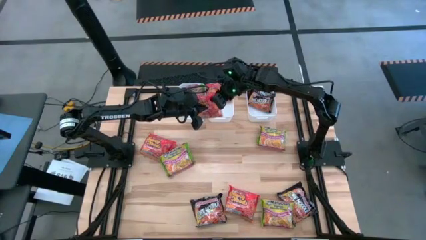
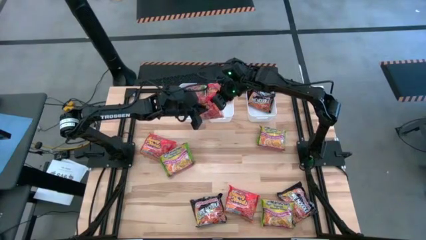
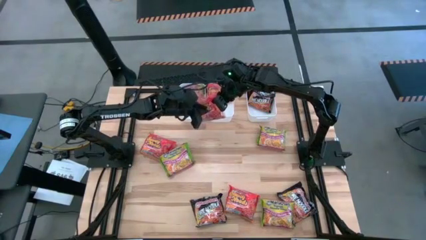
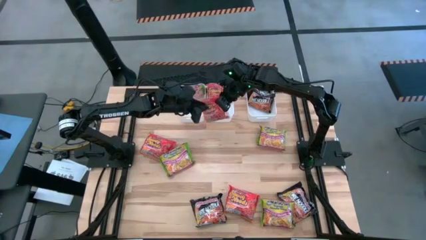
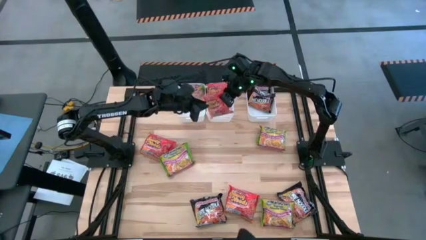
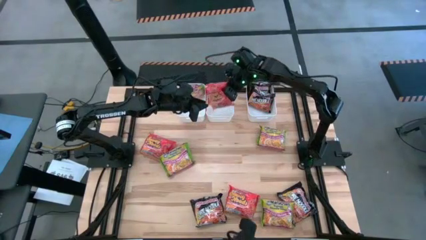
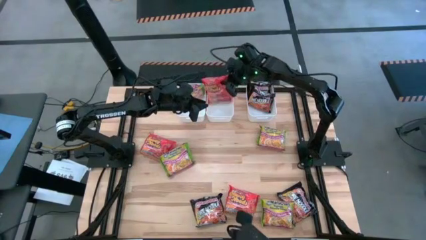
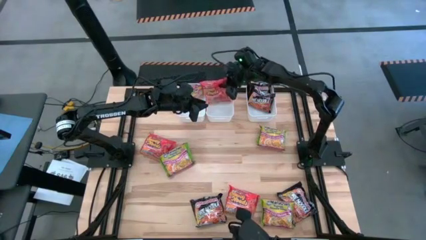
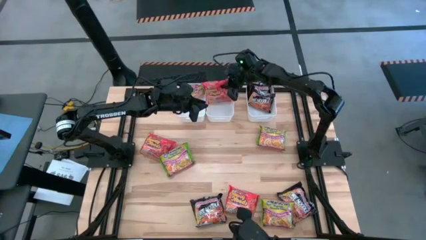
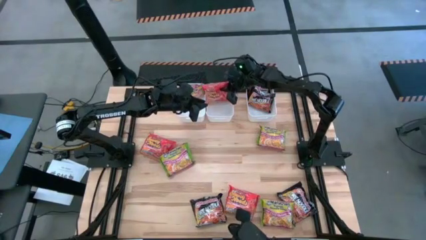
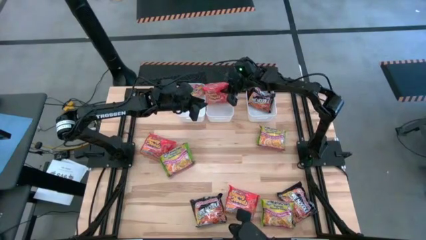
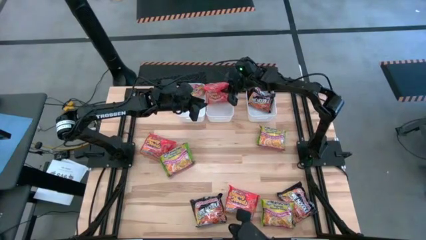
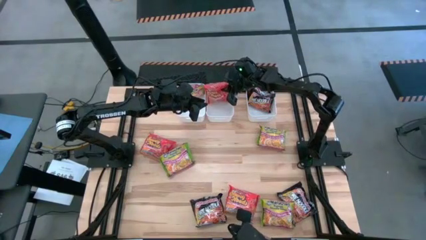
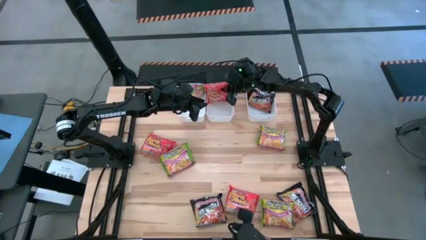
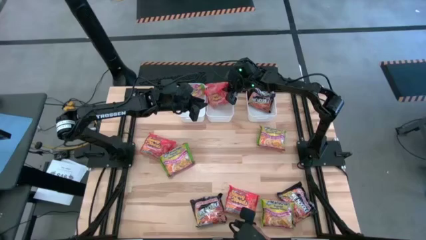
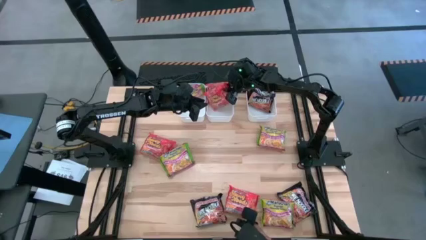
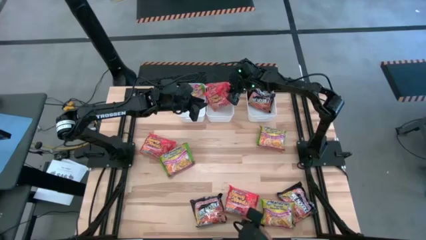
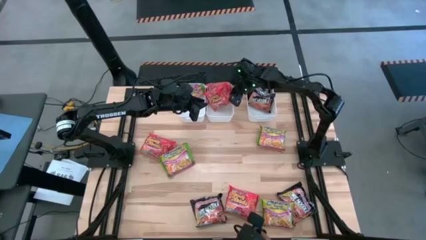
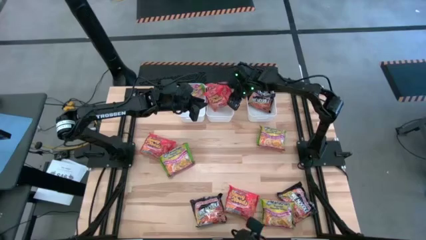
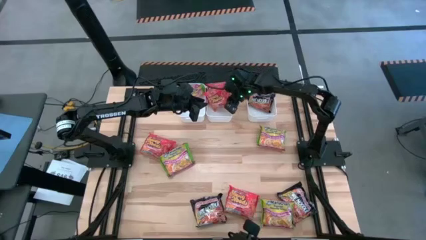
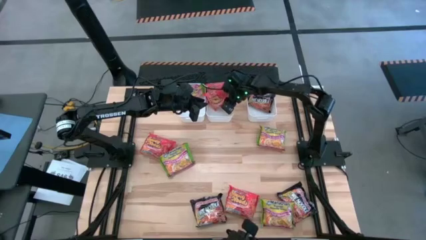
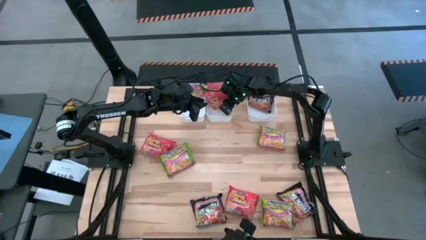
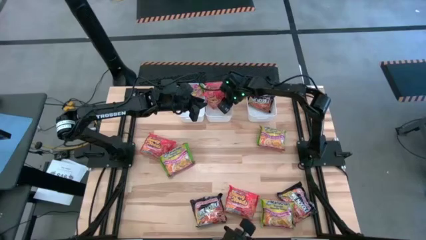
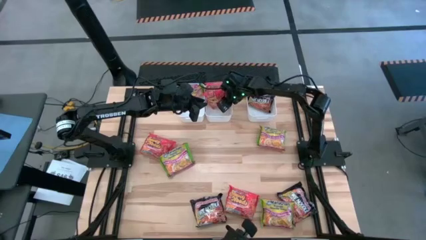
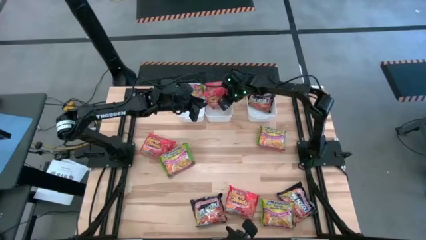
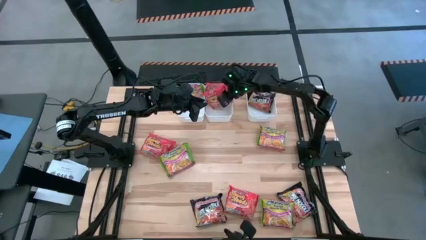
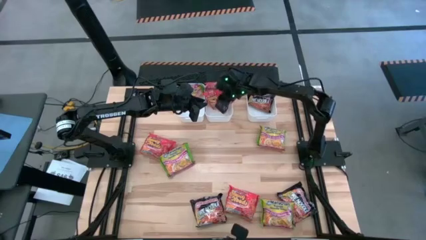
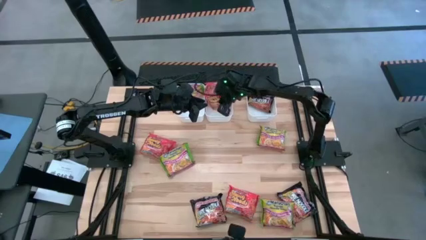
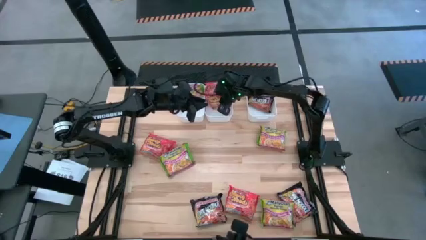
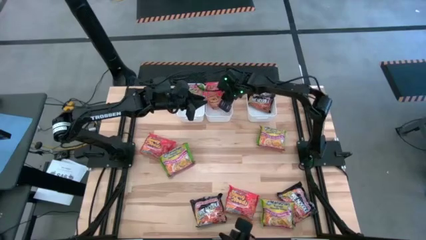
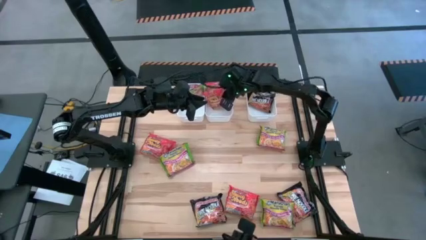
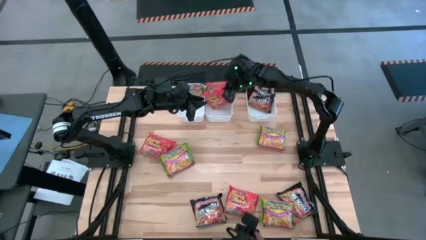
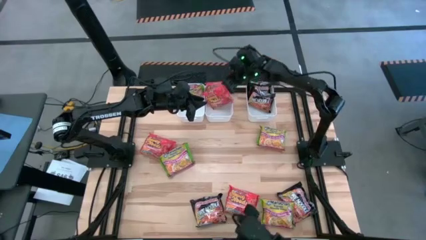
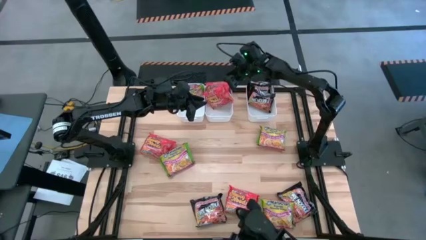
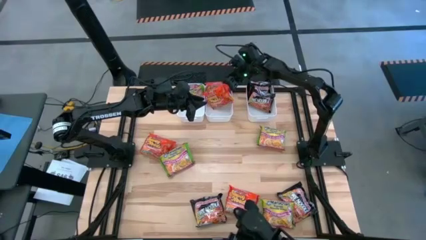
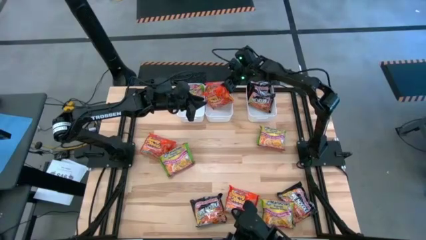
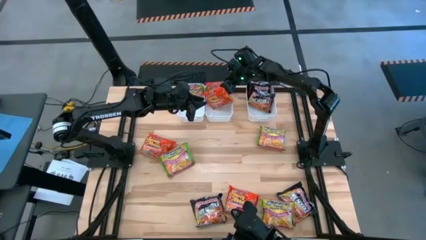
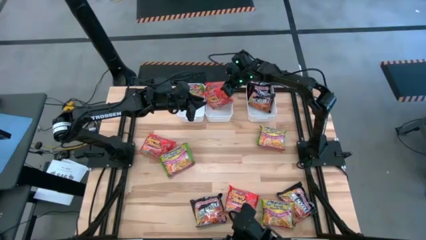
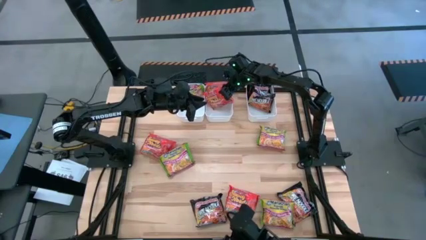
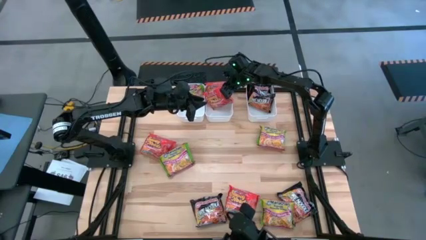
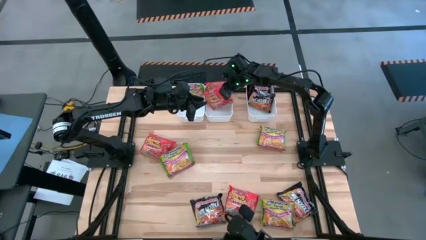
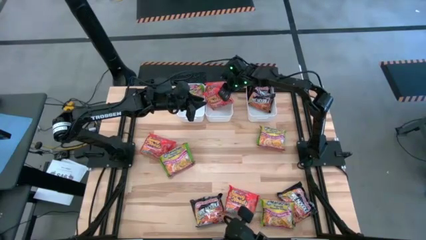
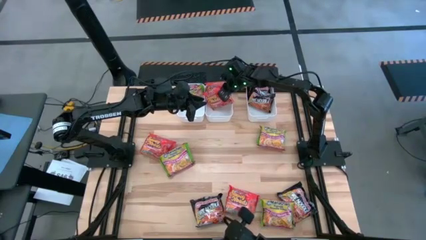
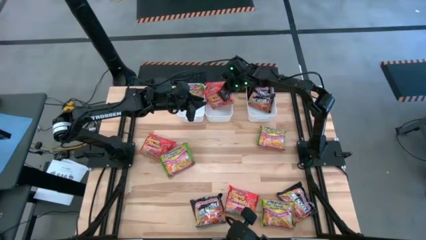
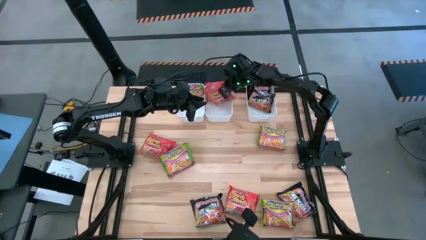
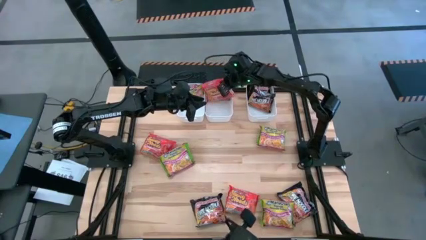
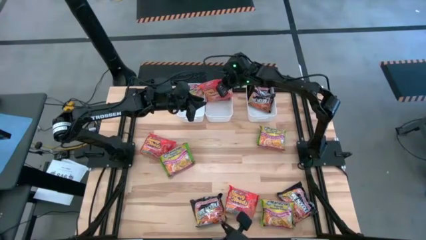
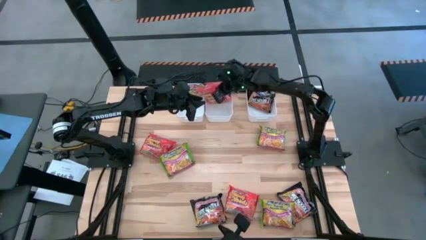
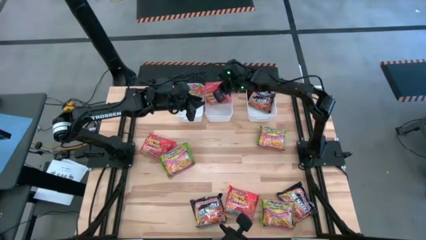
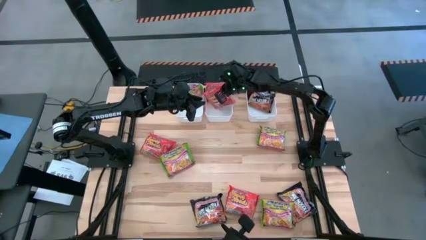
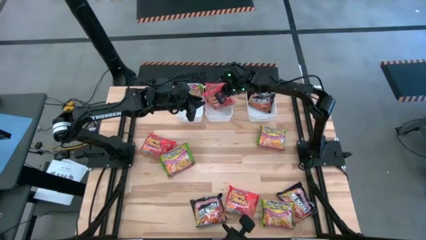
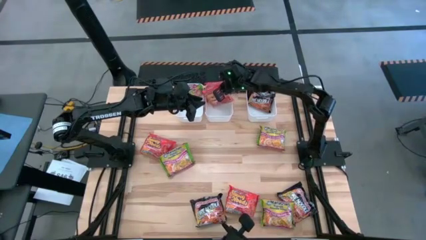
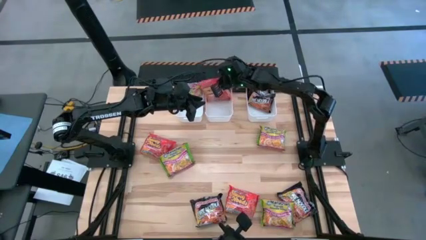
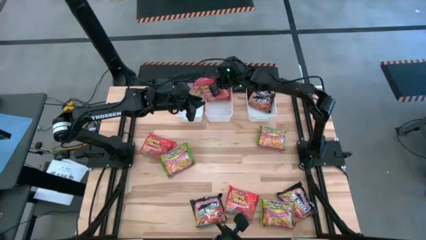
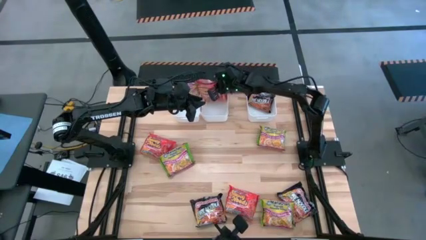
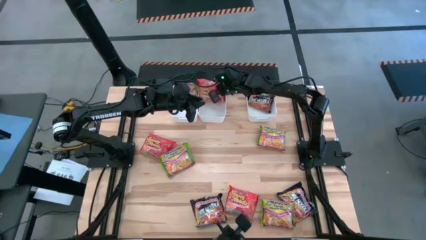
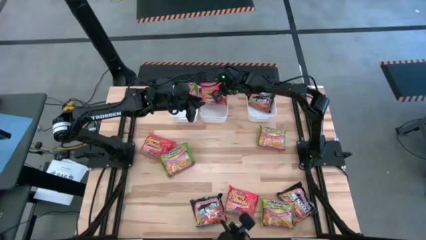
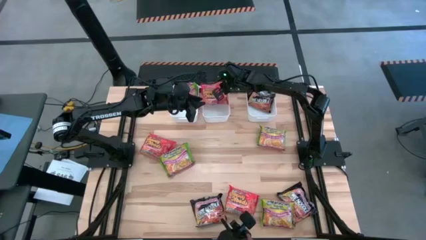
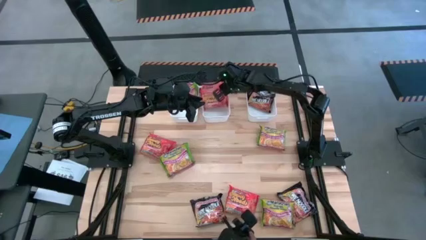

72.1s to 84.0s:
Task: Sort Maruchan noodles
Put the orange noodle pack into the middle white bin

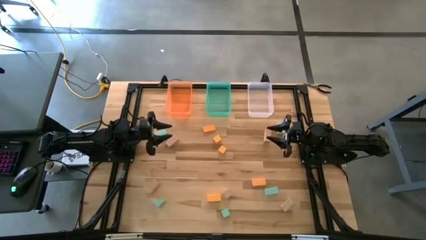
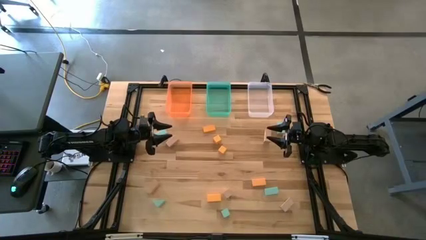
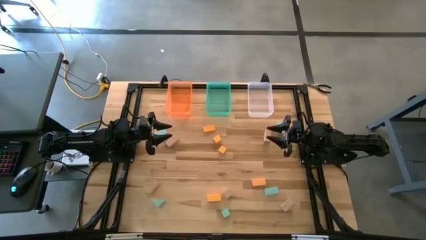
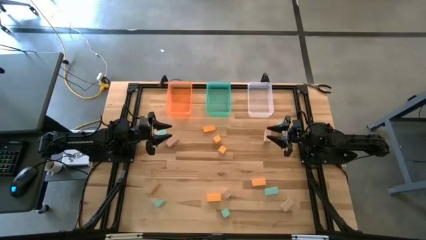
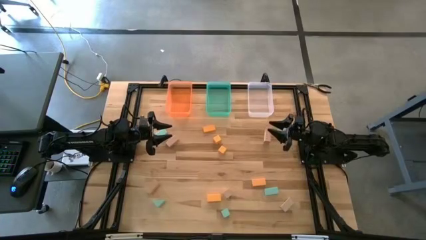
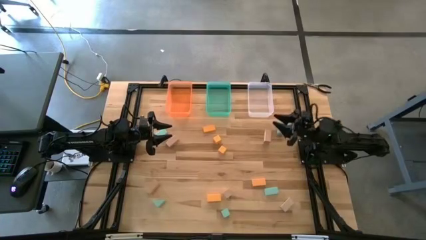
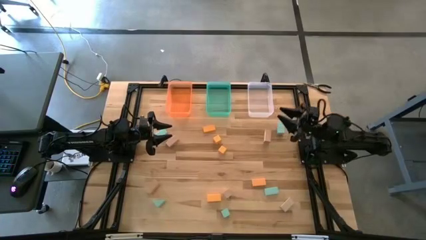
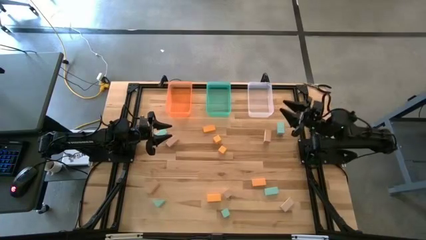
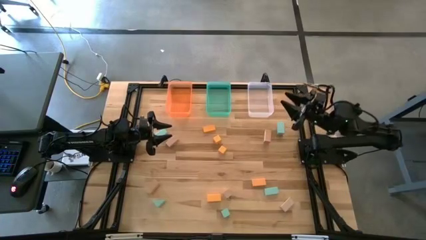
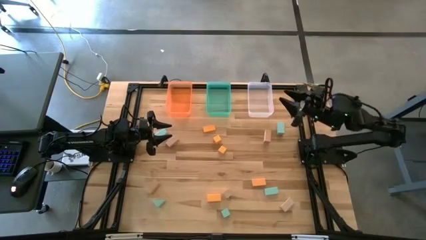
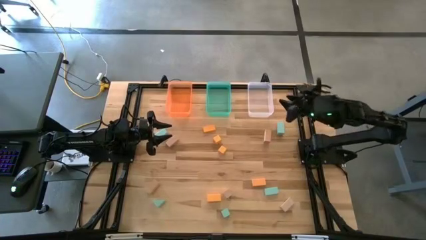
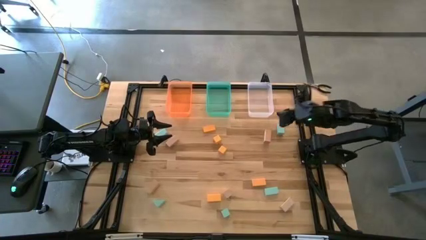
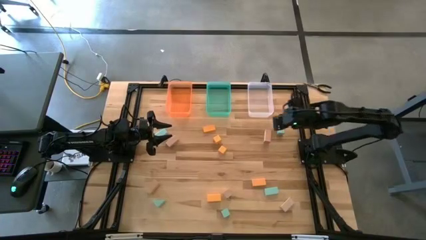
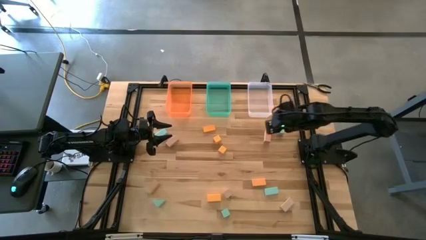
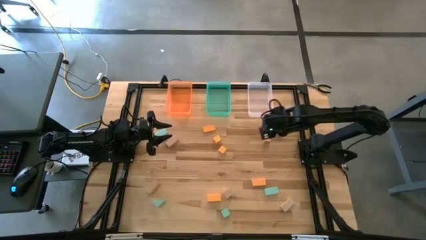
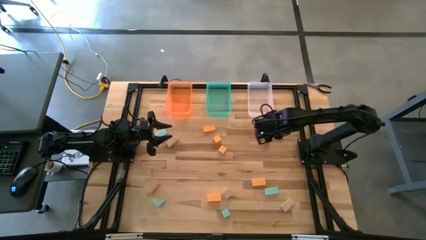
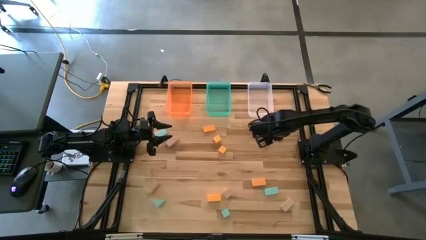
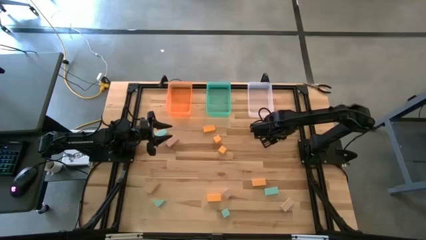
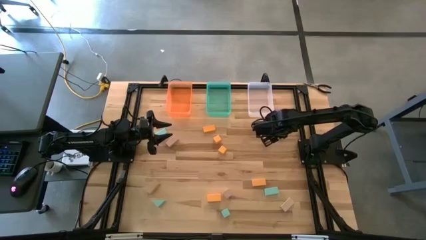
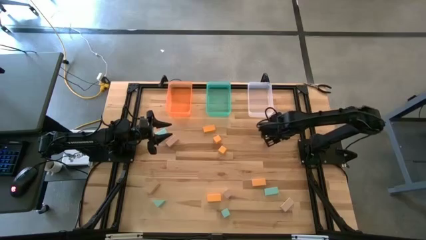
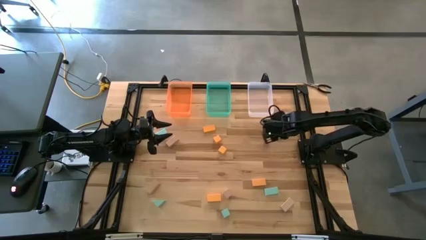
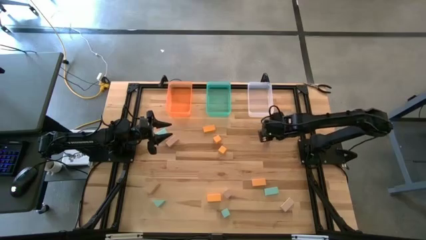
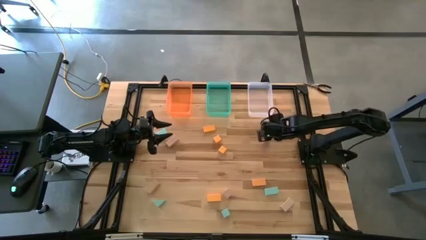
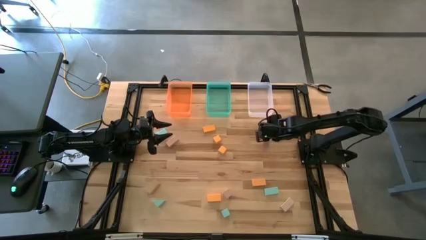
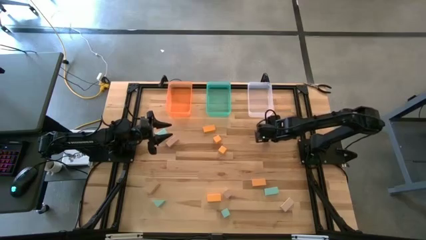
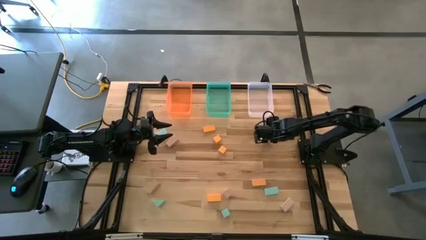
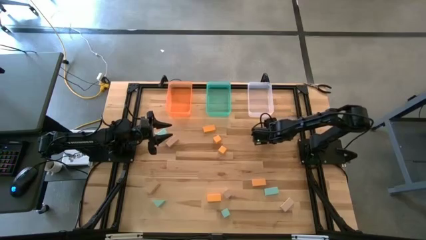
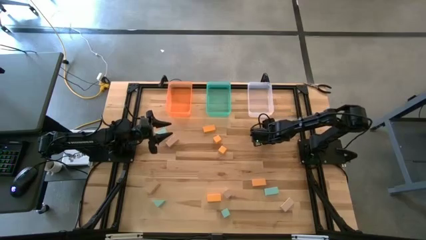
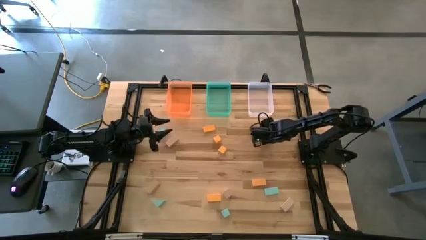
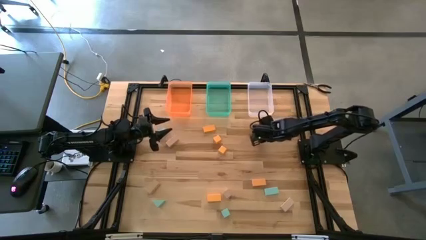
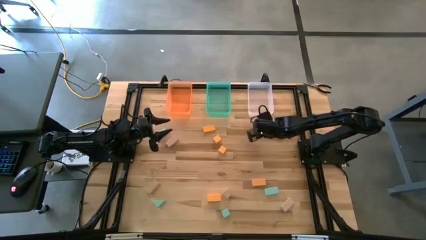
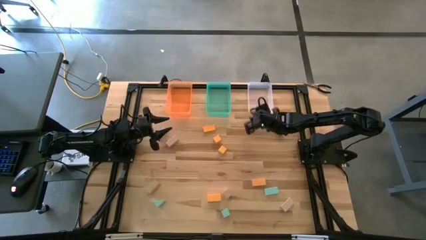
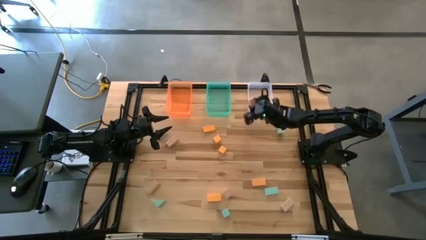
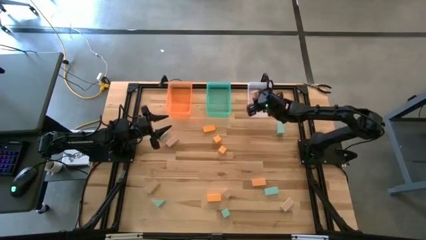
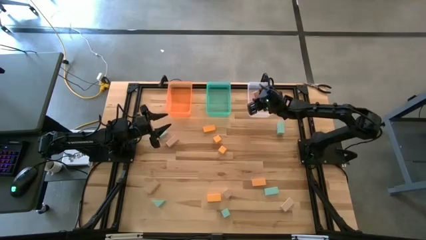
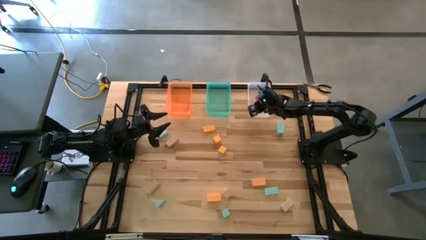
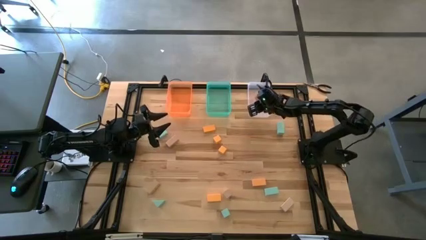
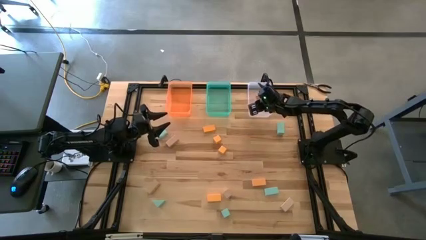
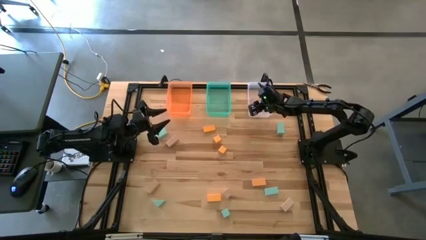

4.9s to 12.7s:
Task: Sort & place blocks by color
Put the brown block into the transparent bin
